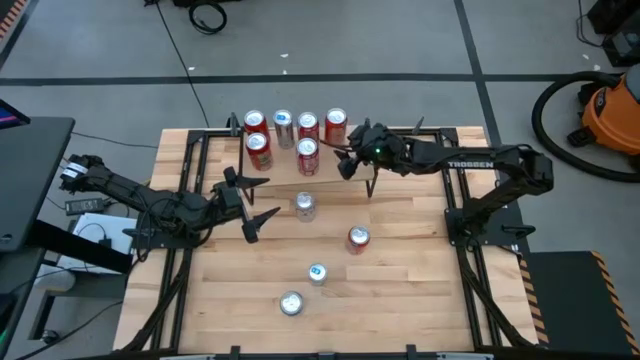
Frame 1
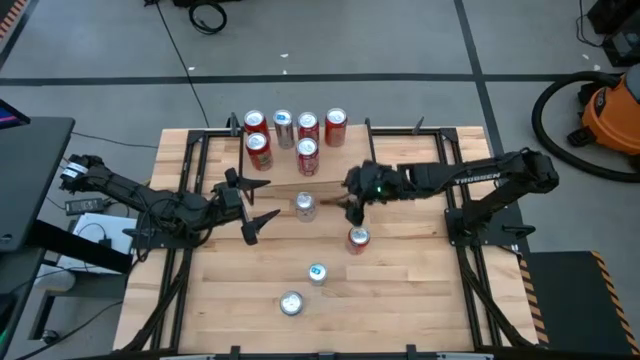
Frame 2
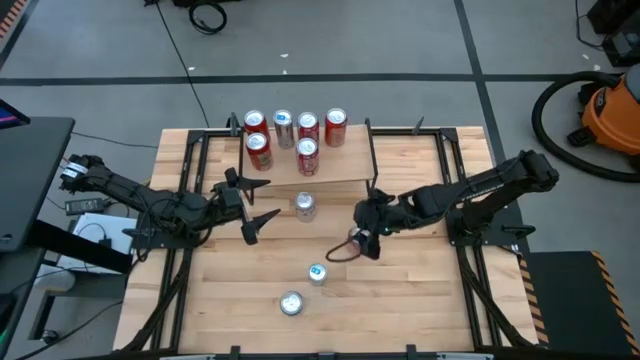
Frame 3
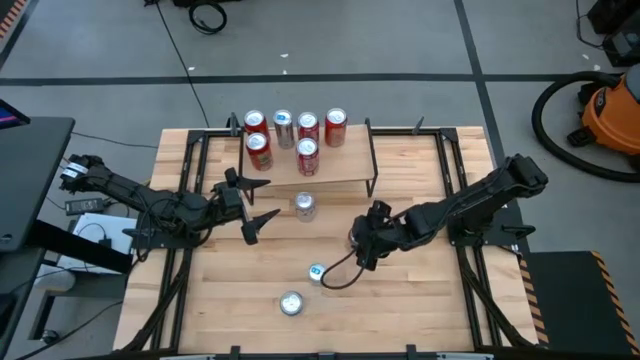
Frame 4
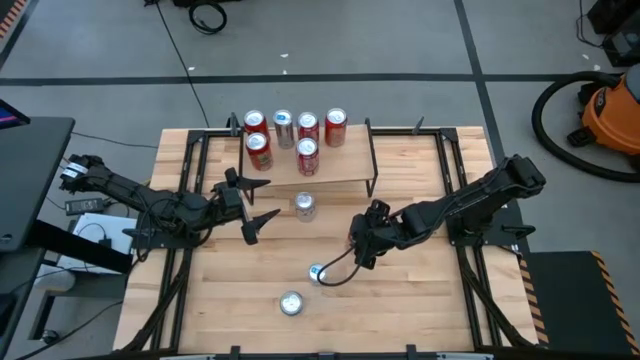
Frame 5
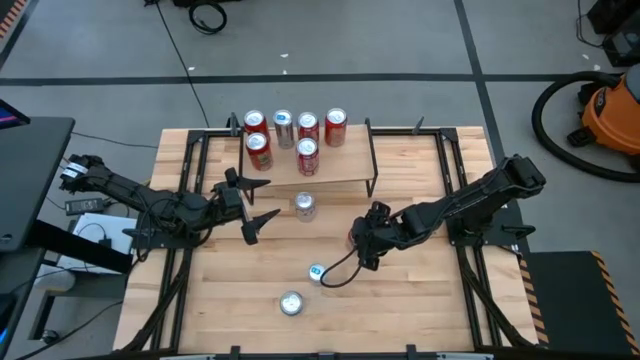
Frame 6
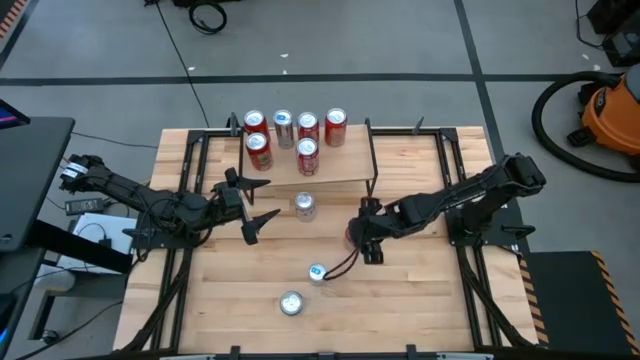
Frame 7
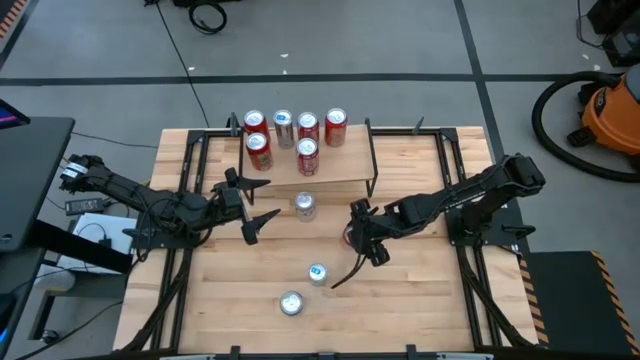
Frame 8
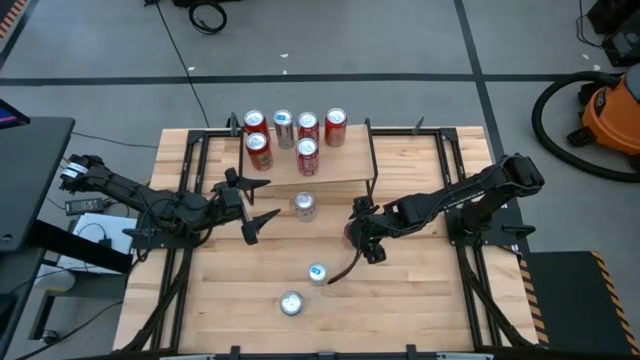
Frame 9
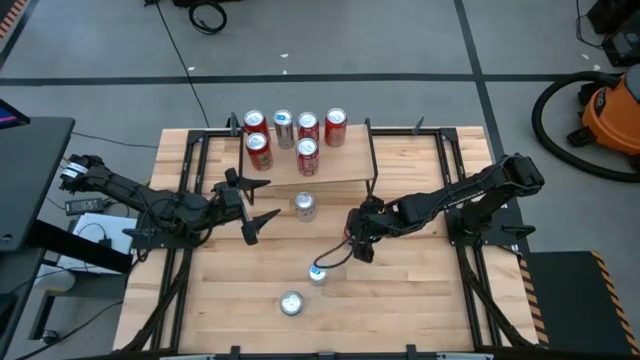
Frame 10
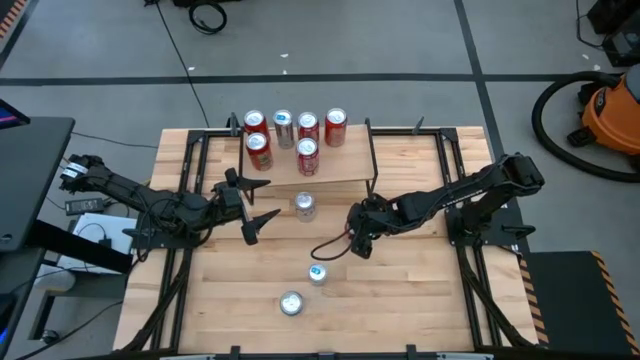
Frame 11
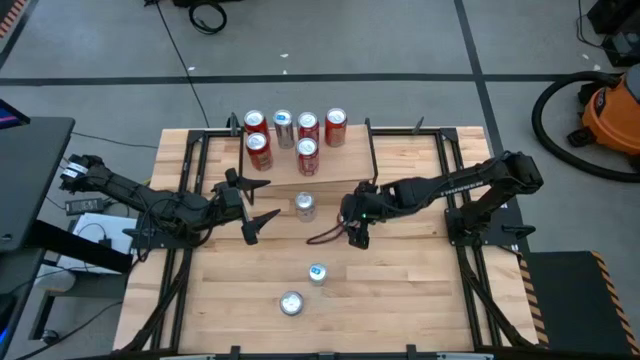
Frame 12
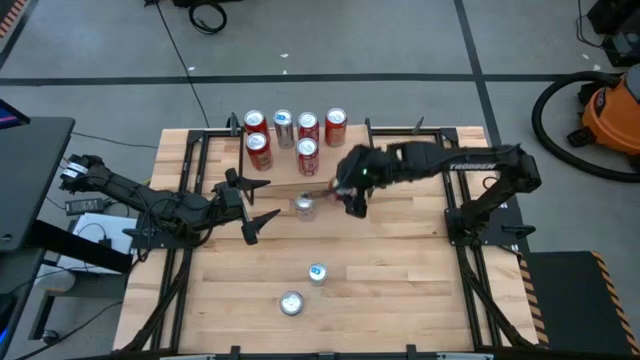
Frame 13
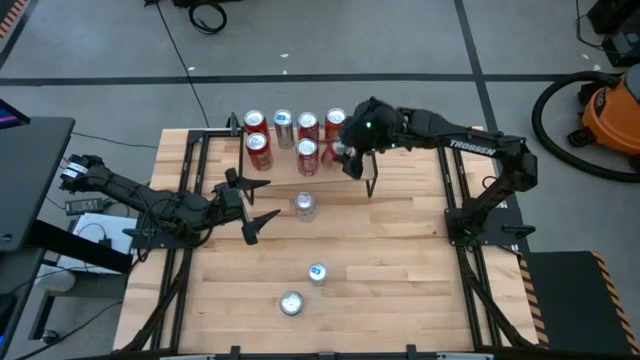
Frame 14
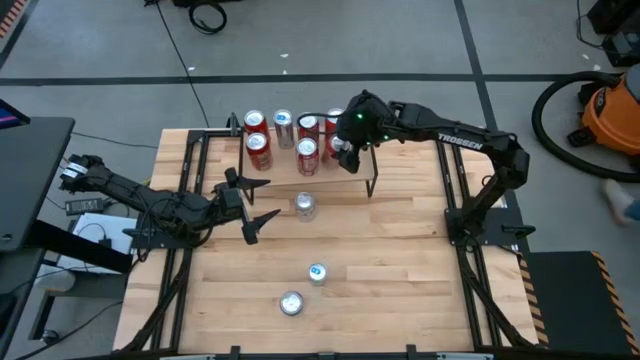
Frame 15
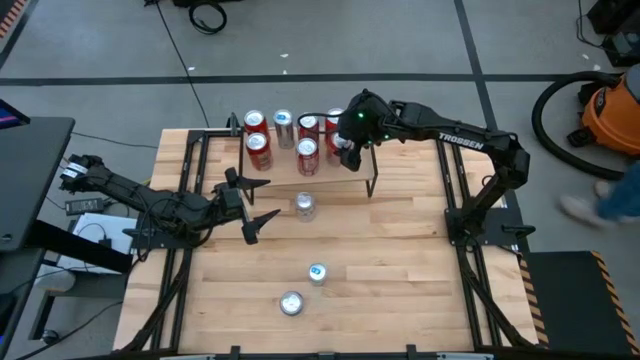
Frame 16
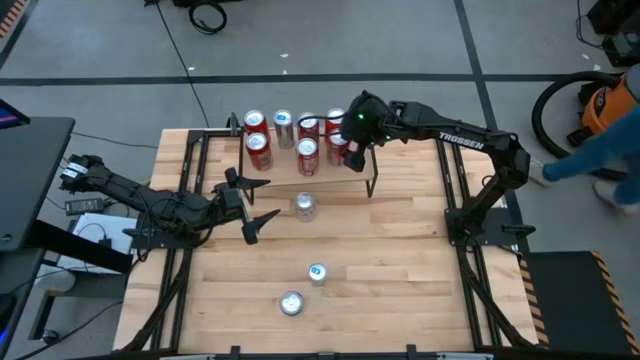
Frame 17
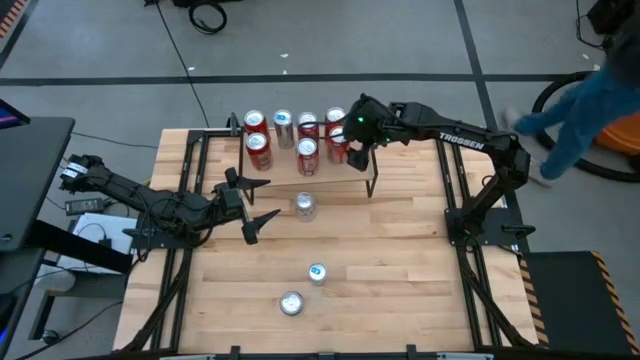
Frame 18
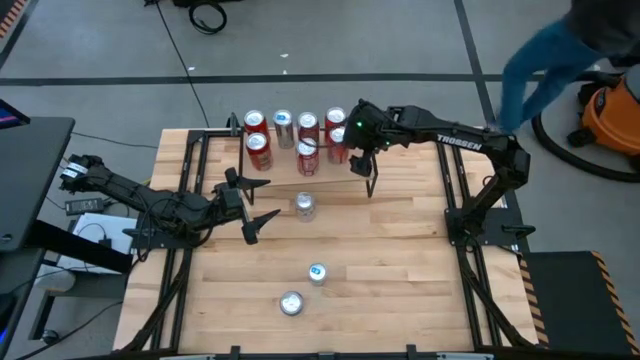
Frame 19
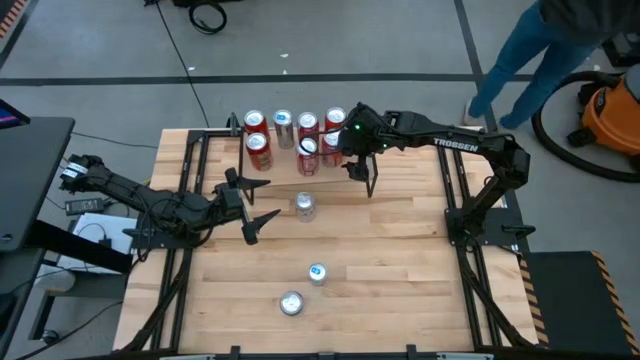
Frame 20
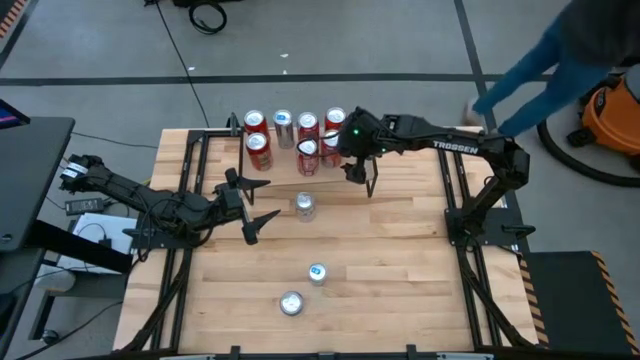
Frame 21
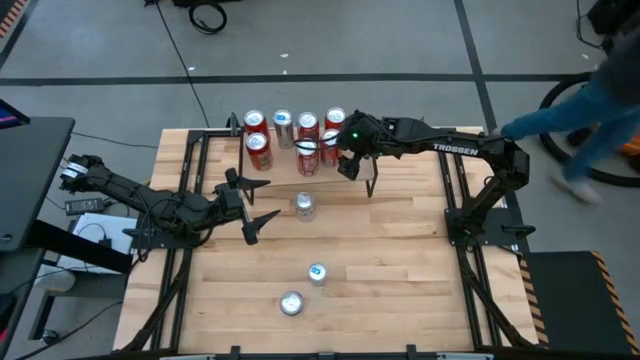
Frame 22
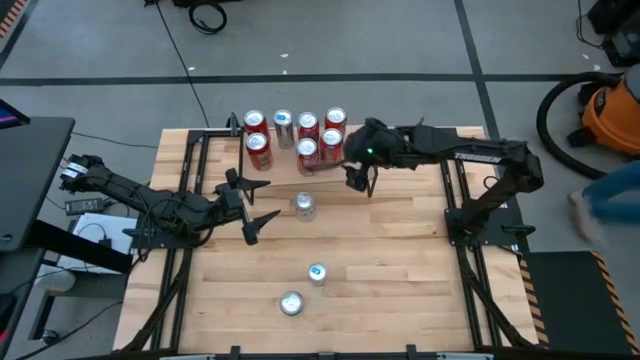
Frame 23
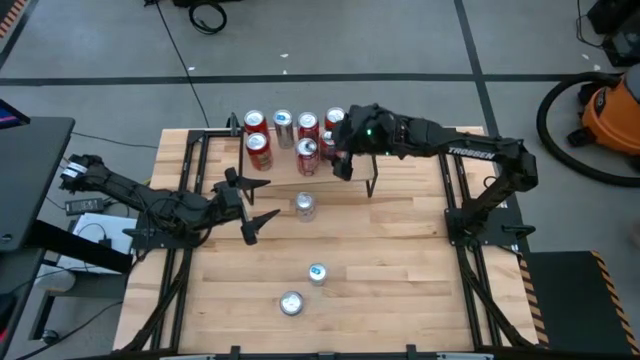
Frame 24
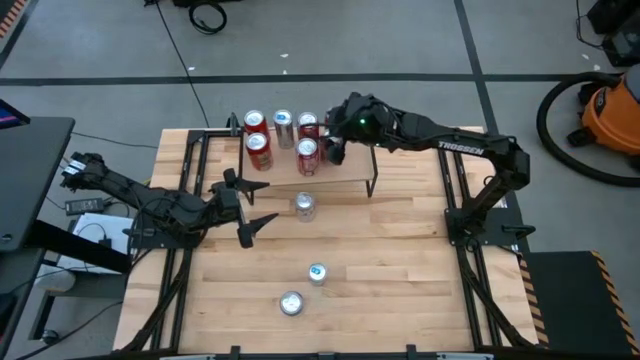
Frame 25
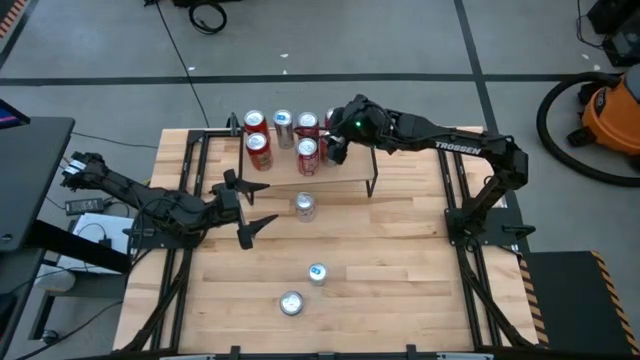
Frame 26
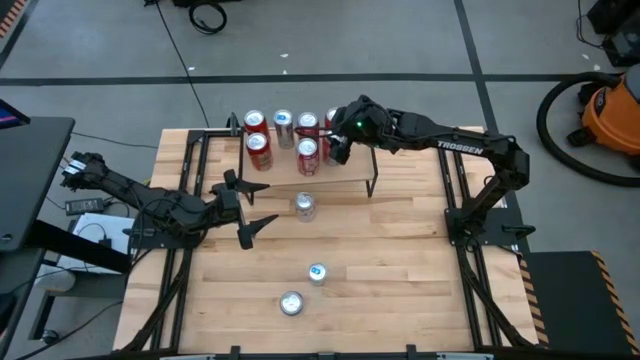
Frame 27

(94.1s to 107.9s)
Task: Place canned beverage on shelf
Put the orange soda can on the shelf

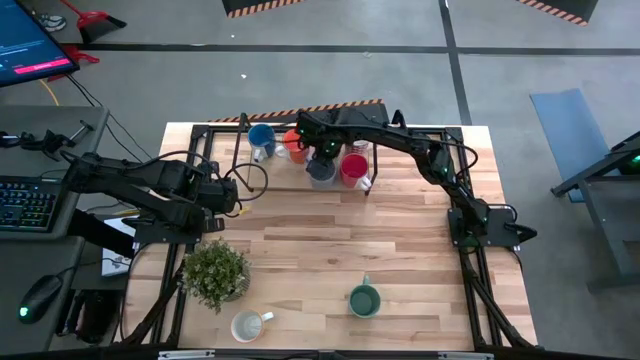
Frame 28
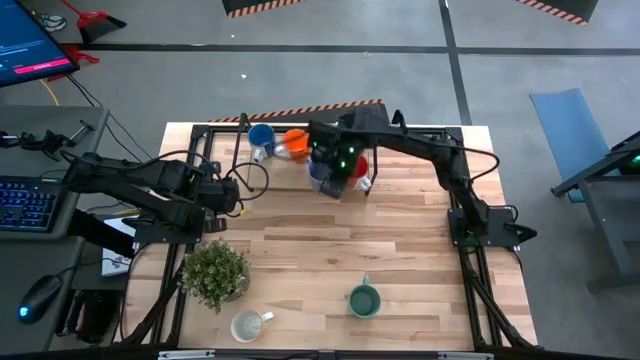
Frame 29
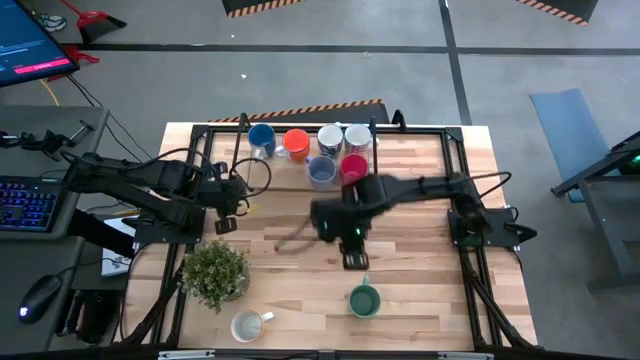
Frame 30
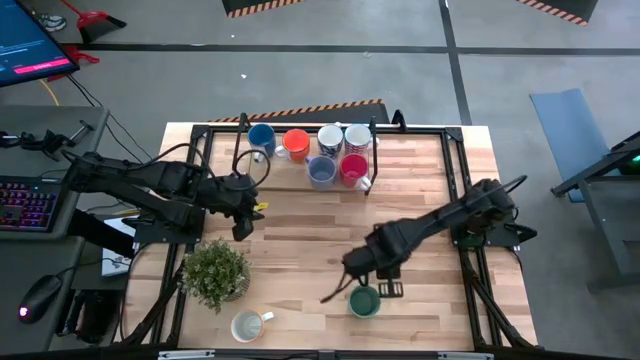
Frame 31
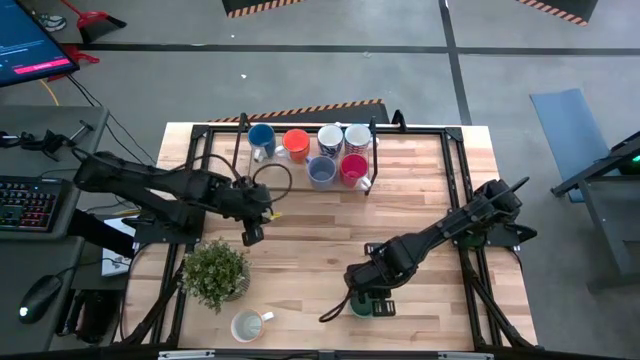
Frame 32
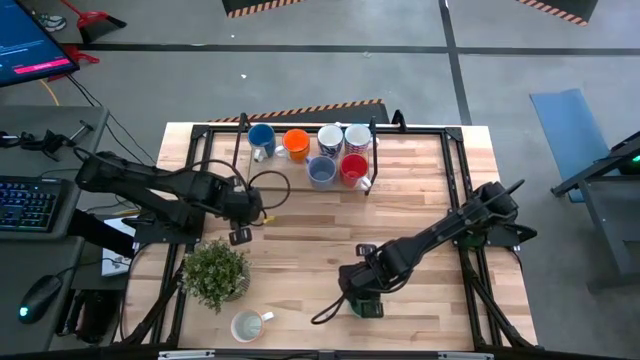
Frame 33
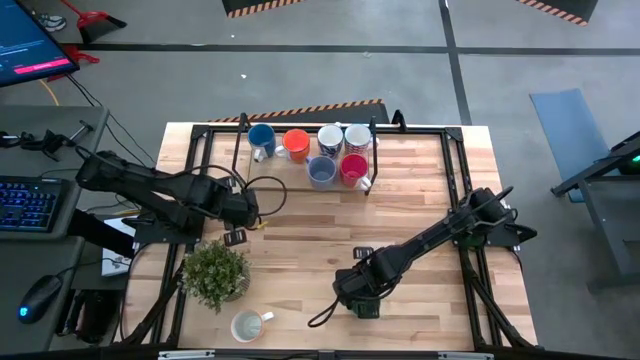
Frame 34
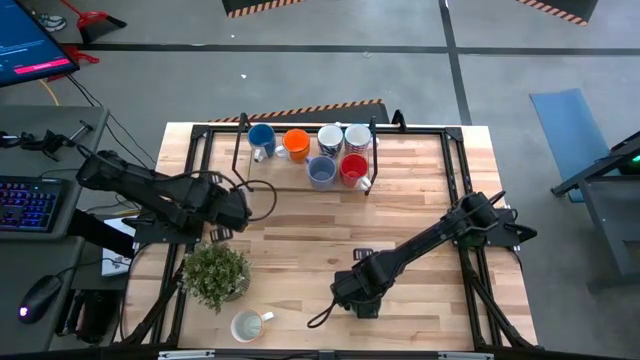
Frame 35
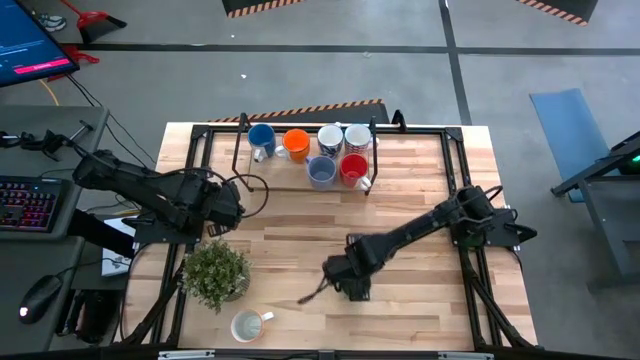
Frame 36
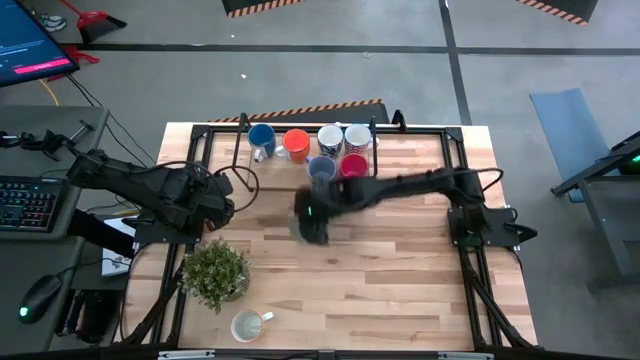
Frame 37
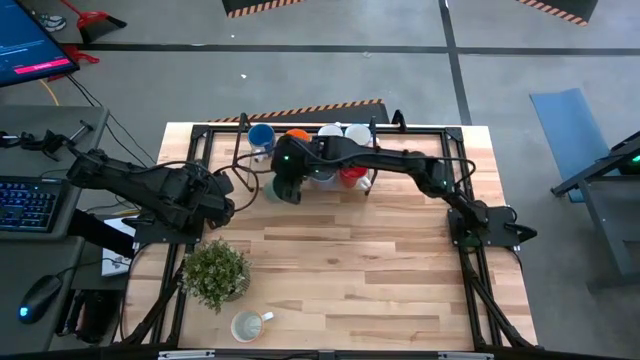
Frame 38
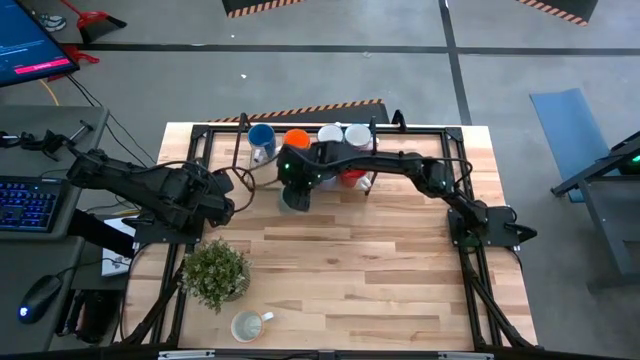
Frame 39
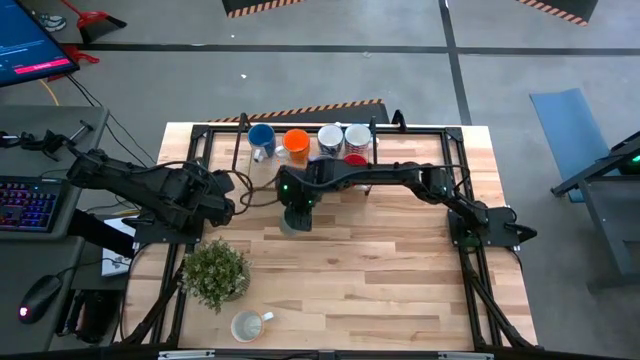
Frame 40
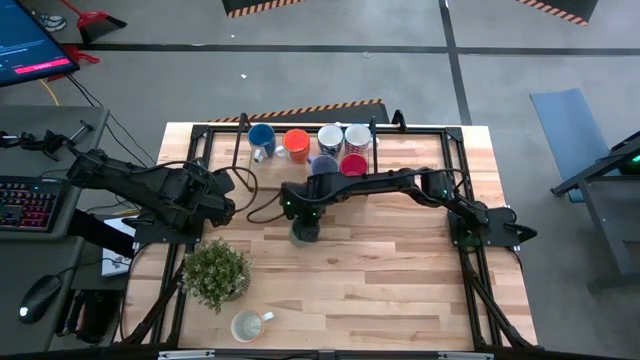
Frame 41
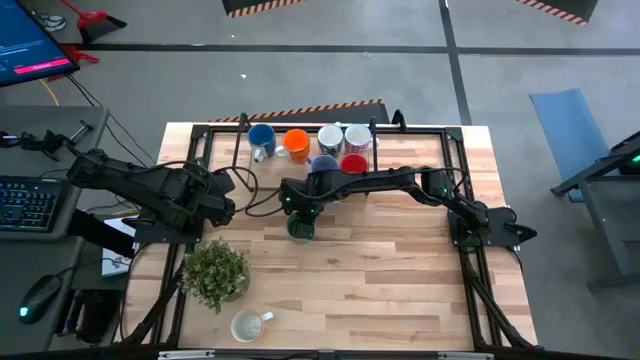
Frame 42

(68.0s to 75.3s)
Task: Place coffee mugs
Move the green mug to the center of the table
